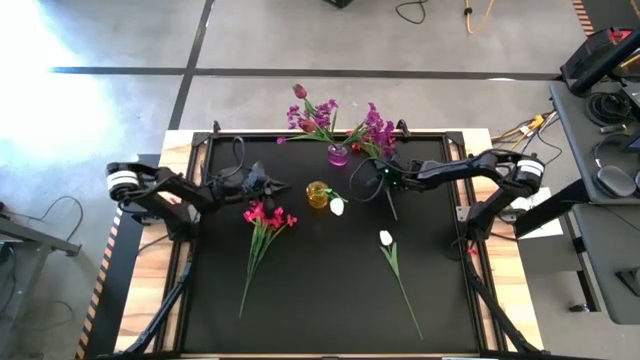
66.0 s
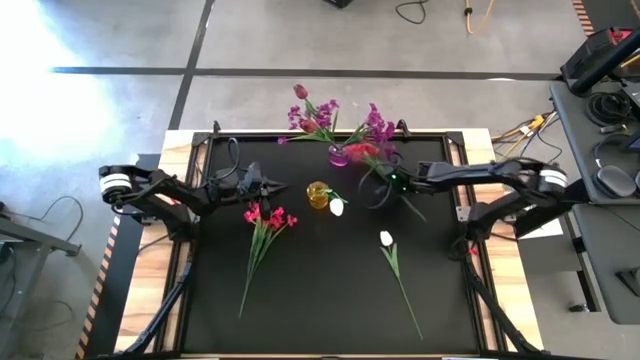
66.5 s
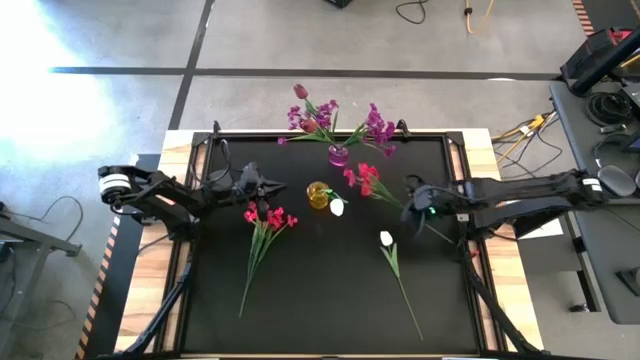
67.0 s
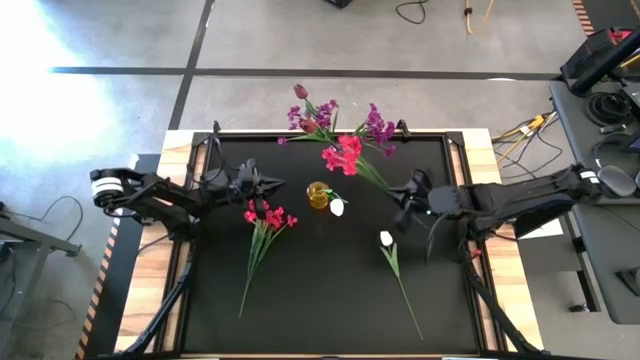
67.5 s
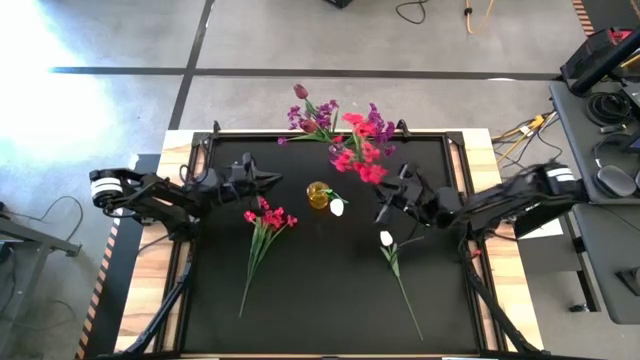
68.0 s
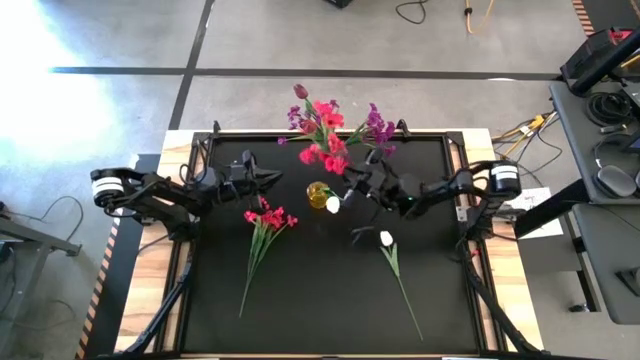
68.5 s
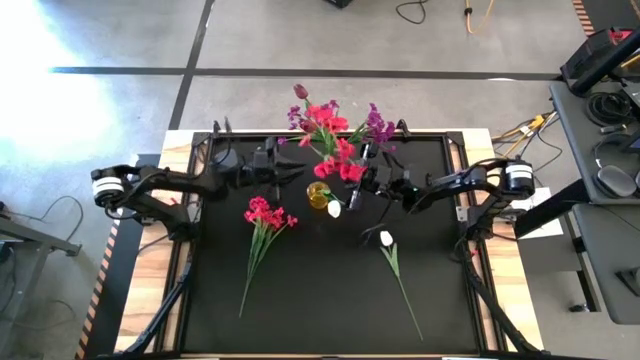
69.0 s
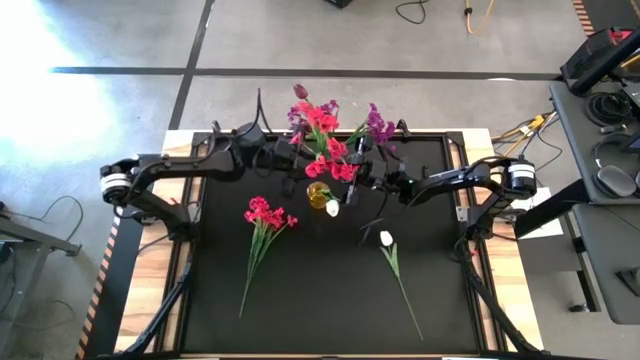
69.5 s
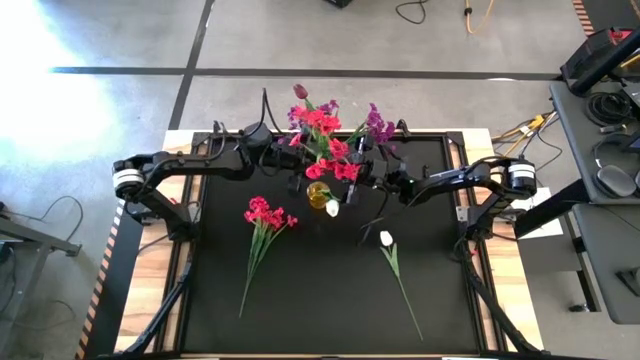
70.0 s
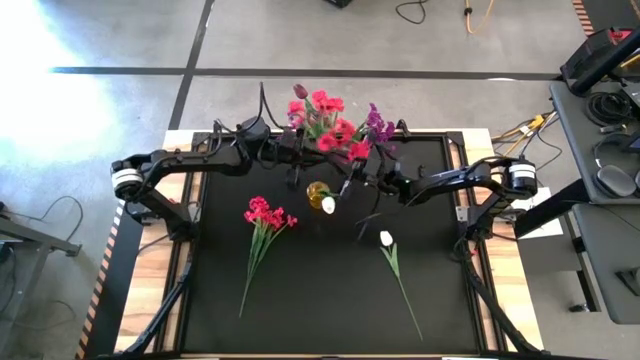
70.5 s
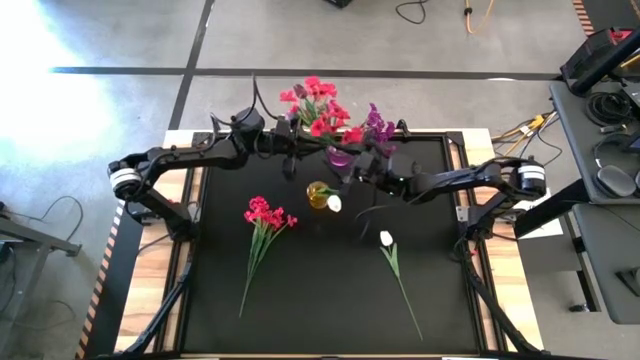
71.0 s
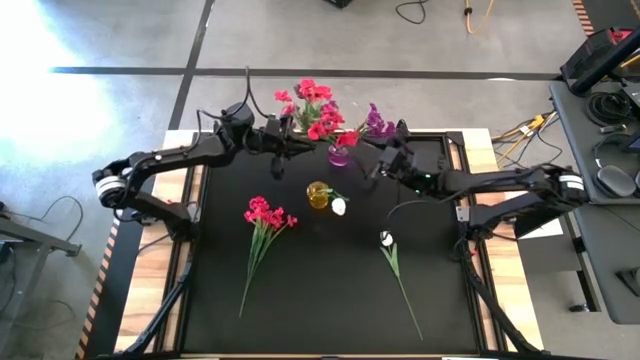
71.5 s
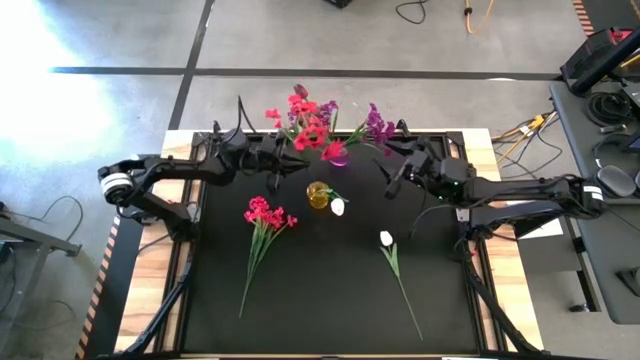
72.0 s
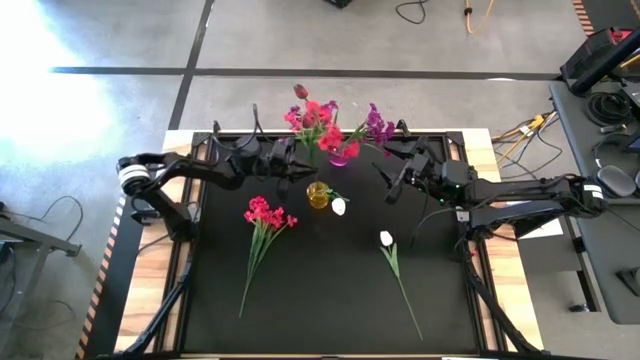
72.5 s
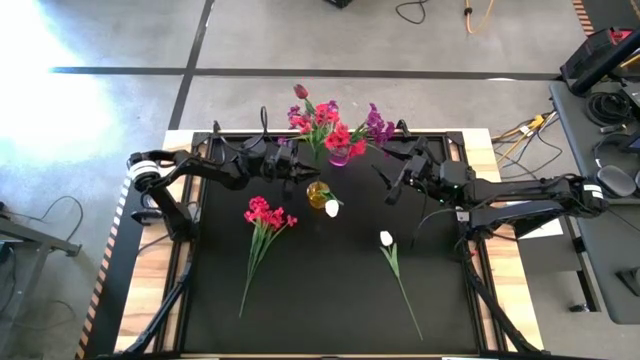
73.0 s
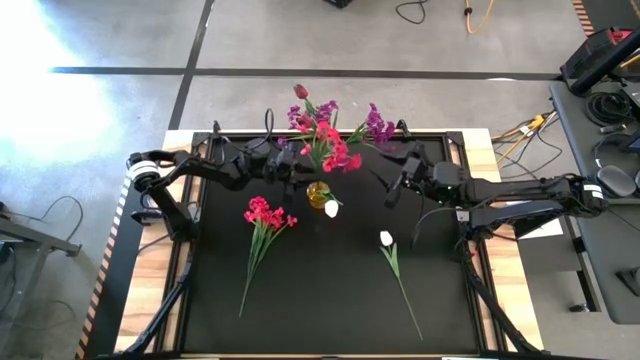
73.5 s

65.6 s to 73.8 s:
Task: Sort flowers into vase by color
Put the red flowers into the yellow vase

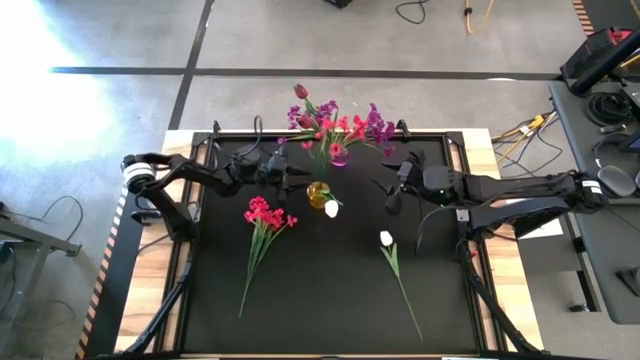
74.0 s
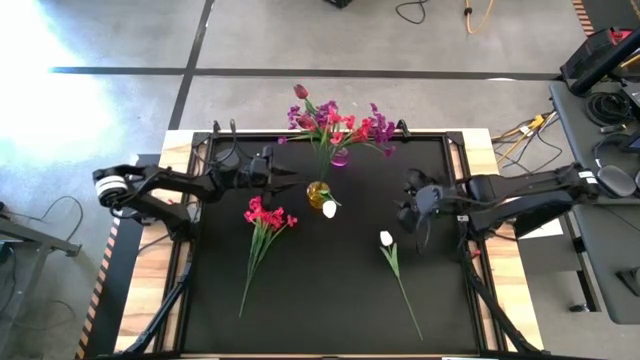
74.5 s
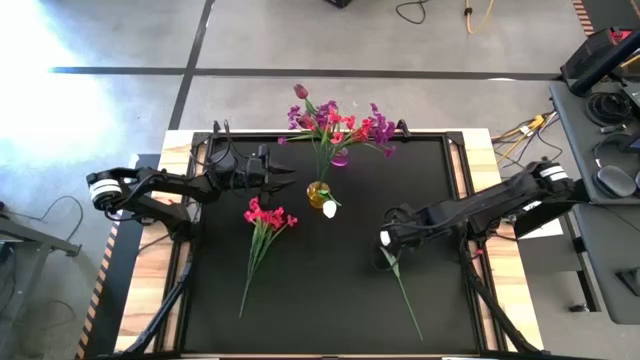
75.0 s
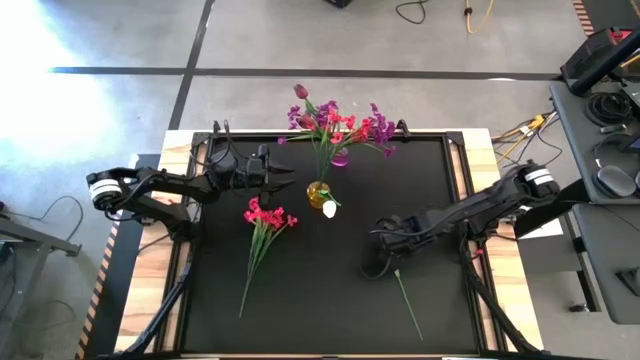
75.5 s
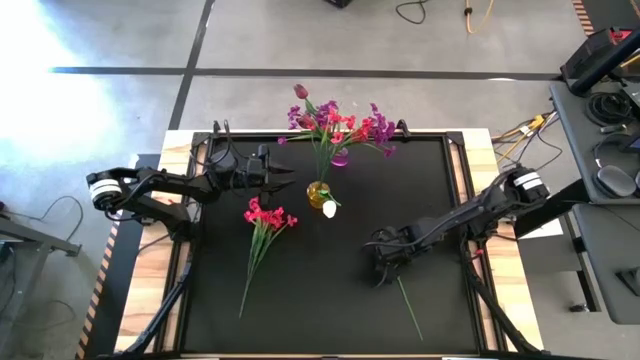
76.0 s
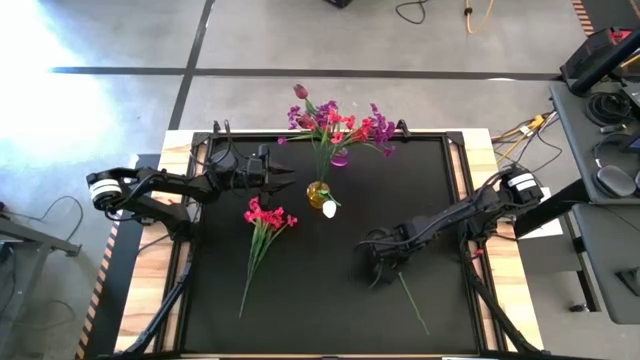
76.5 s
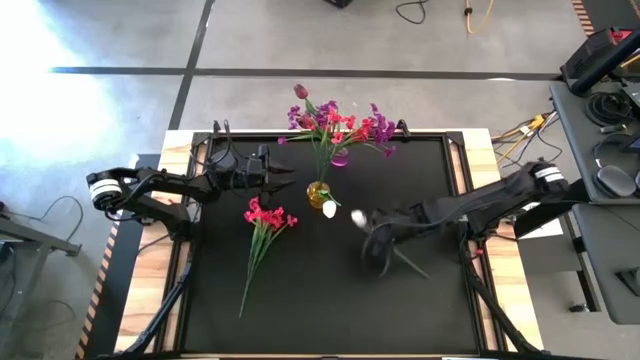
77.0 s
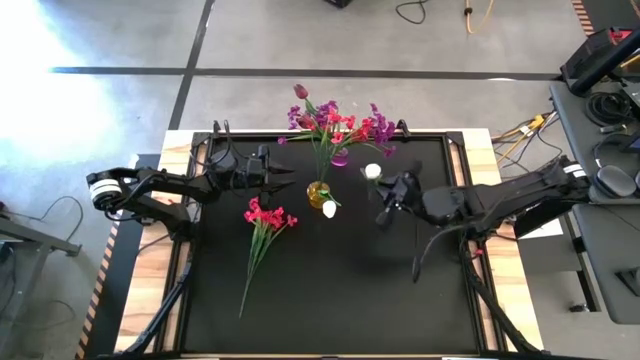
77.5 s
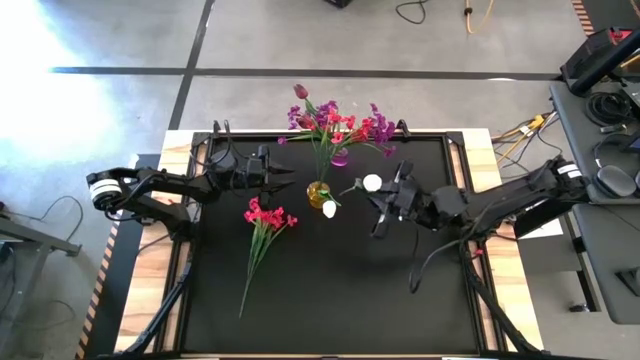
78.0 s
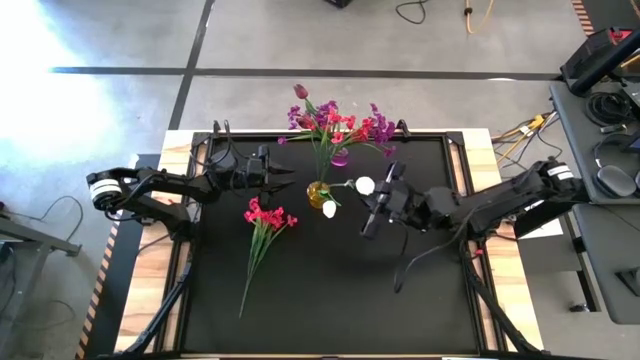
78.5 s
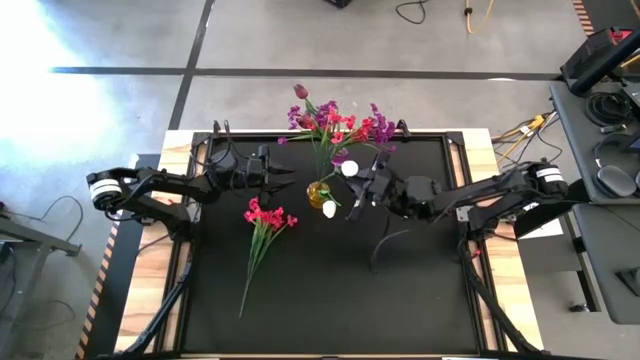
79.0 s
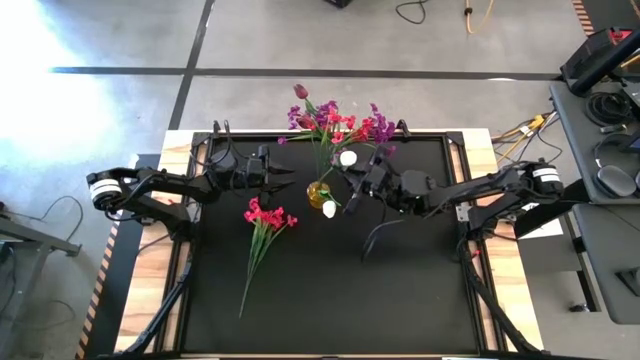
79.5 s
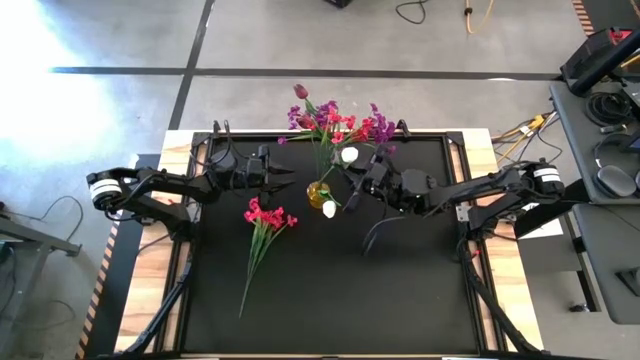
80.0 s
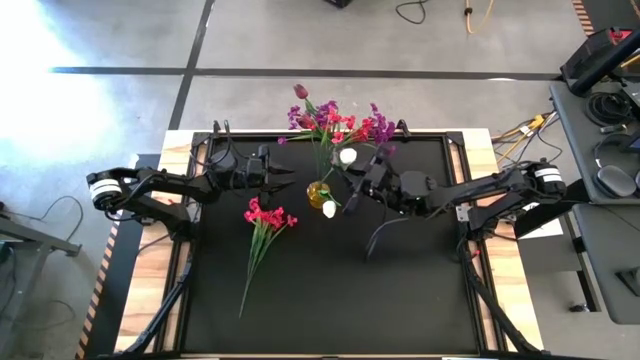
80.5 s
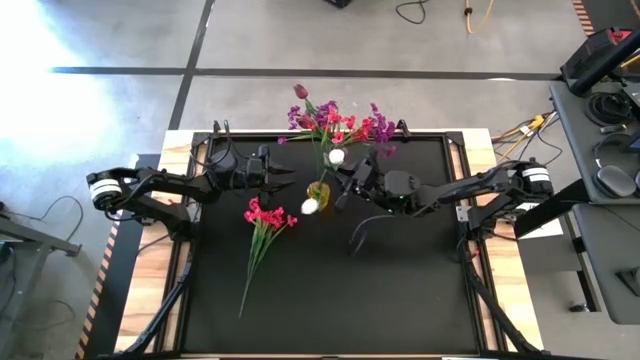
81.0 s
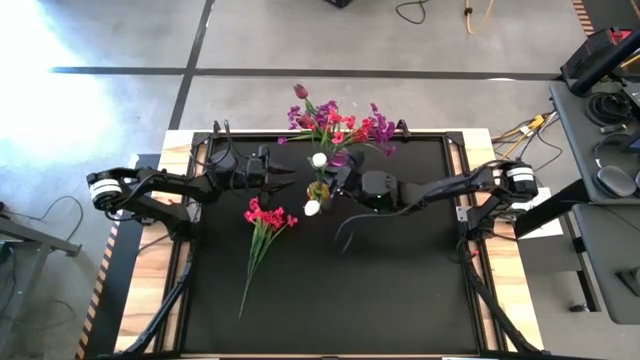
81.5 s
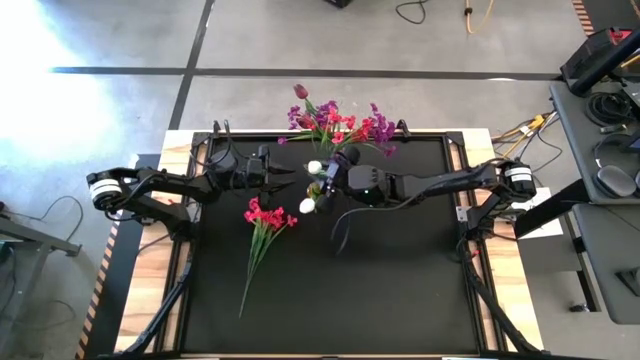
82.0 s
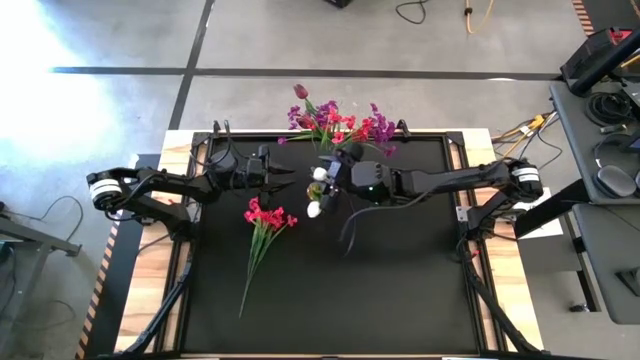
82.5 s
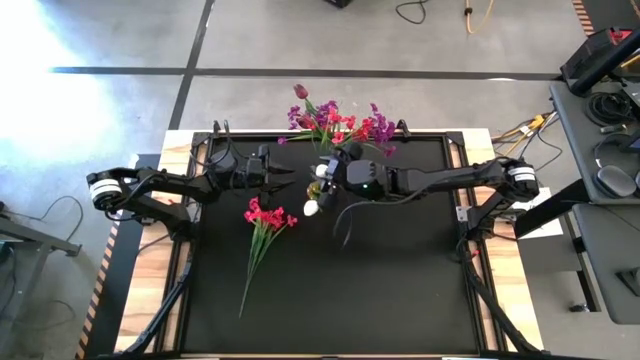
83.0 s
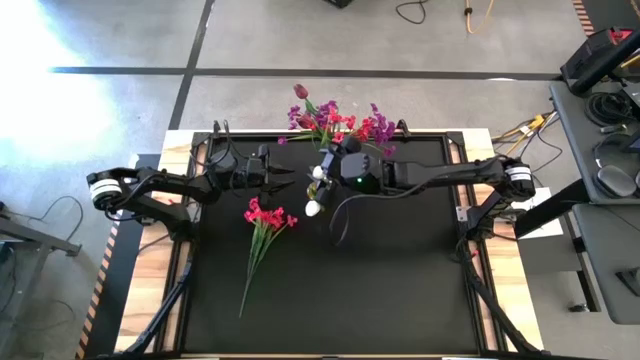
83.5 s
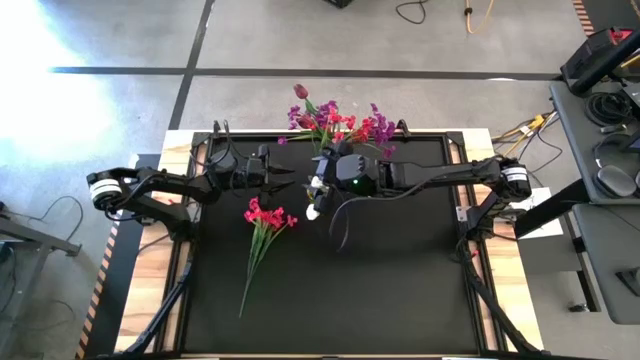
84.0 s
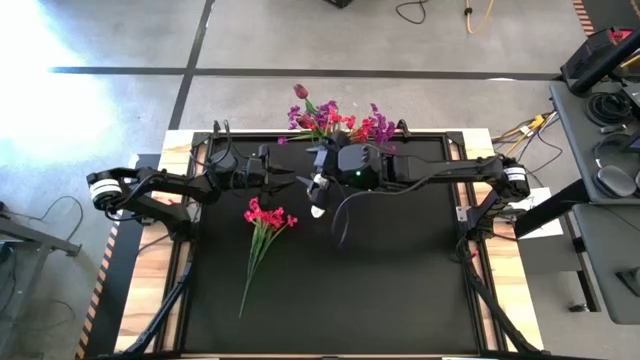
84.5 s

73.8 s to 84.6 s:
Put the white tulip into the yellow vase

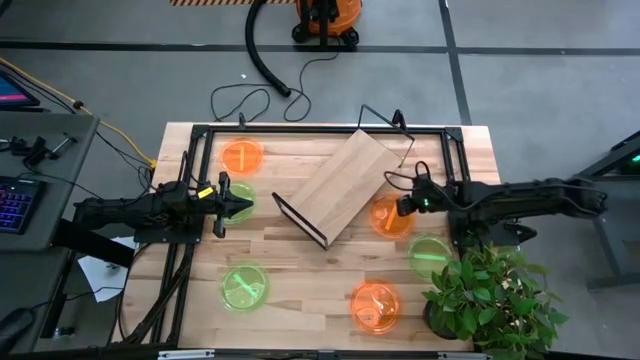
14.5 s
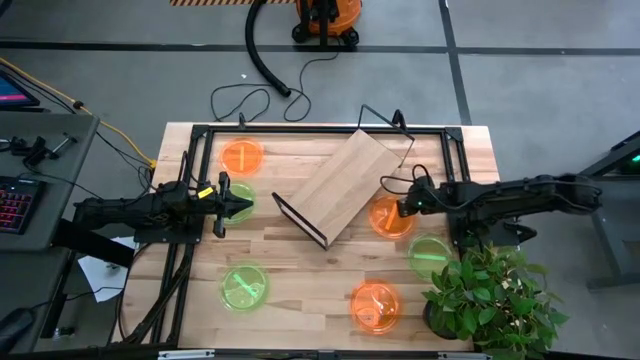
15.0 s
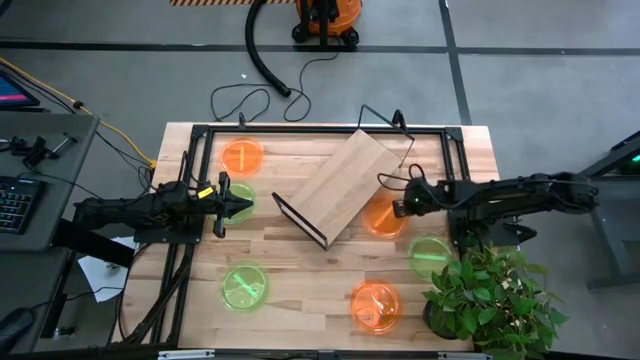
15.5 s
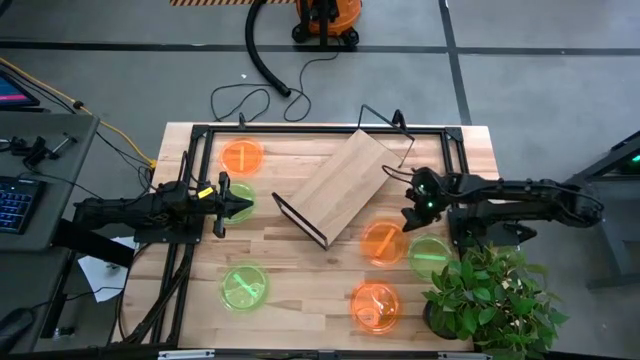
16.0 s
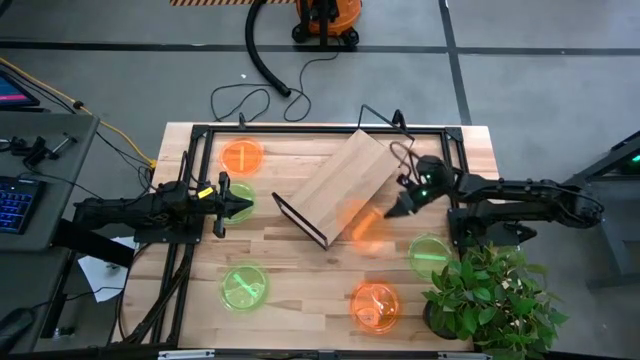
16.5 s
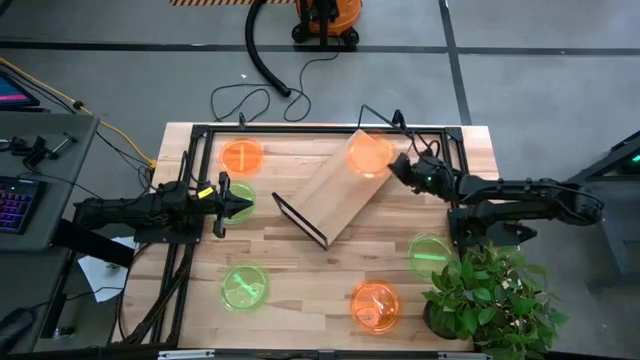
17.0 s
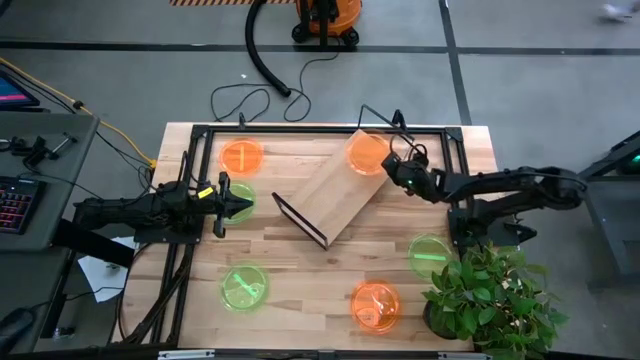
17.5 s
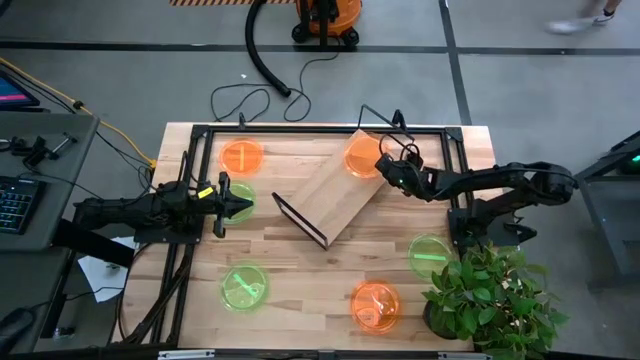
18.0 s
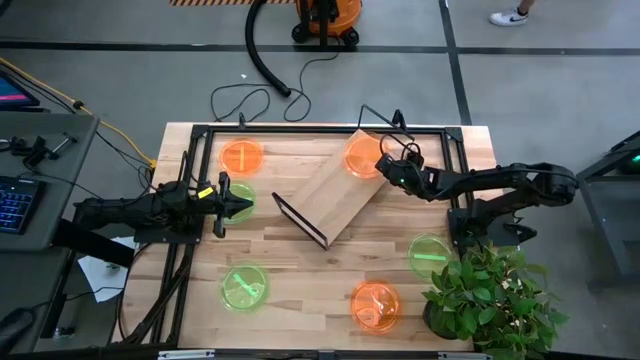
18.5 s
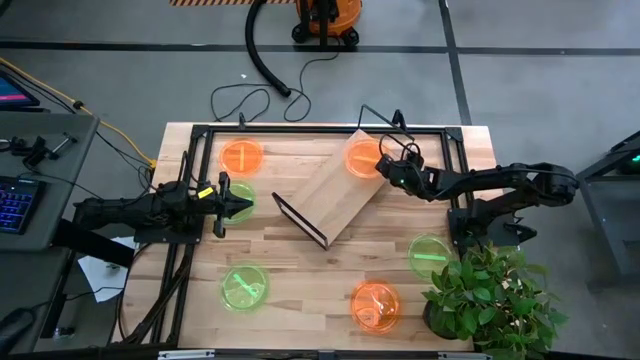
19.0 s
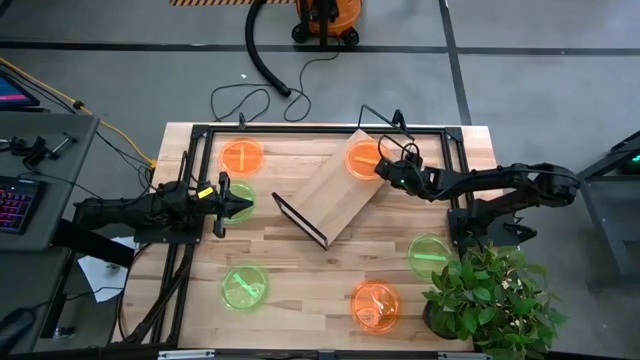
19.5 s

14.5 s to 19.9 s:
Task: Place and stack plates onto a shelf
Put the middle right orange plate on the shelf
